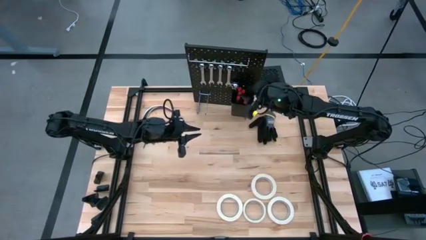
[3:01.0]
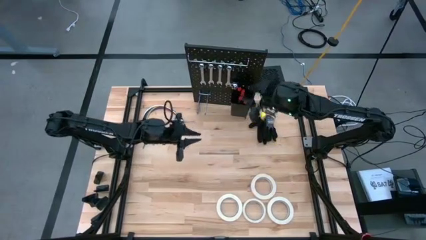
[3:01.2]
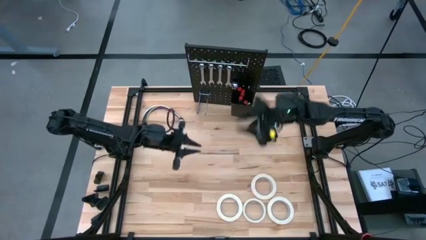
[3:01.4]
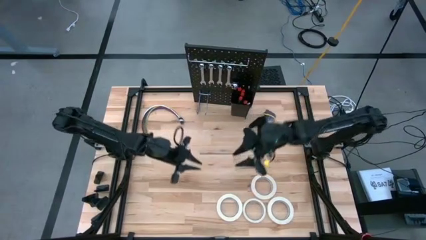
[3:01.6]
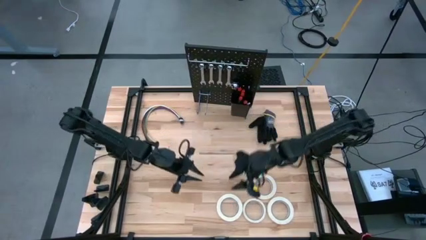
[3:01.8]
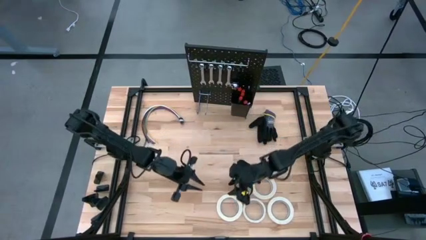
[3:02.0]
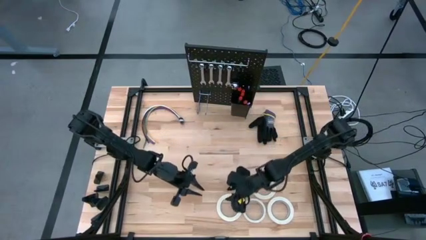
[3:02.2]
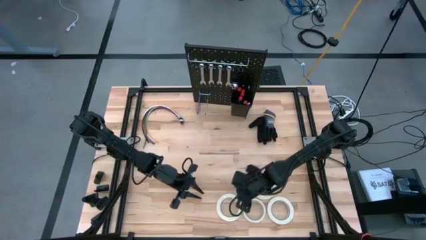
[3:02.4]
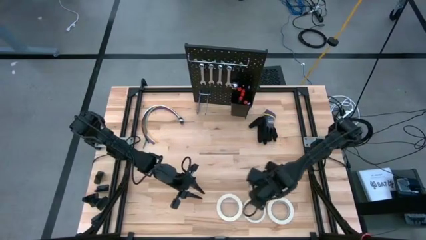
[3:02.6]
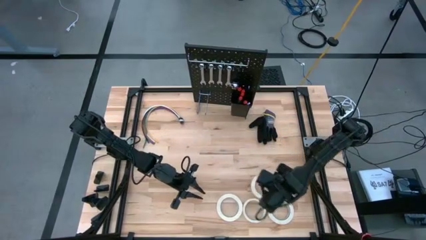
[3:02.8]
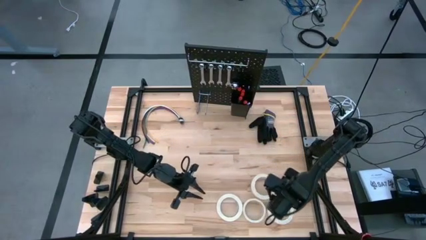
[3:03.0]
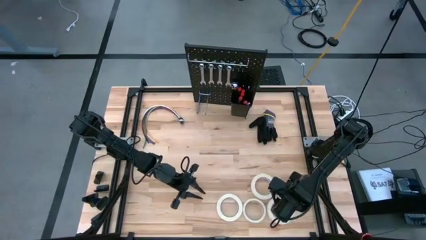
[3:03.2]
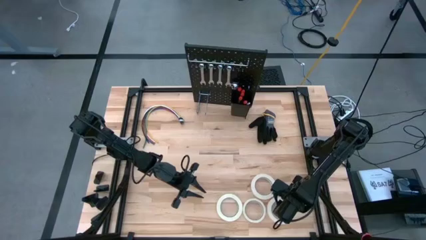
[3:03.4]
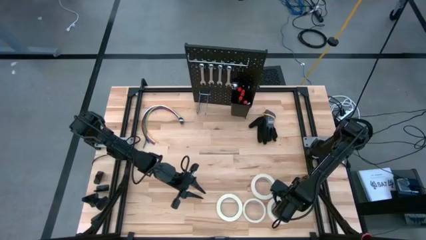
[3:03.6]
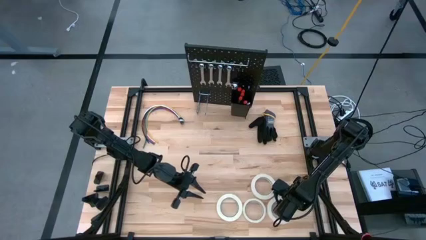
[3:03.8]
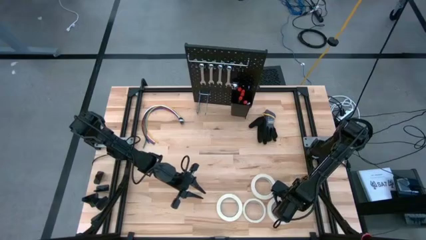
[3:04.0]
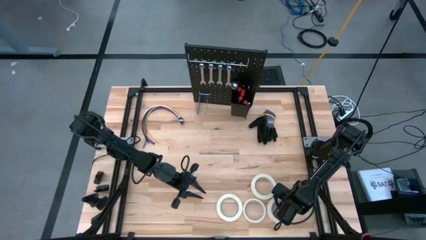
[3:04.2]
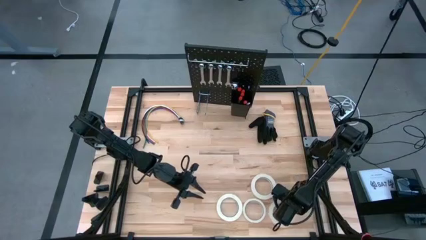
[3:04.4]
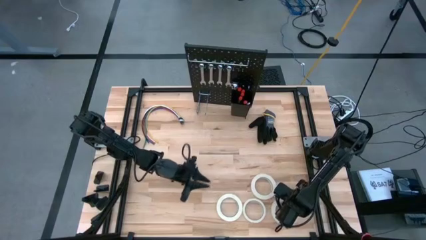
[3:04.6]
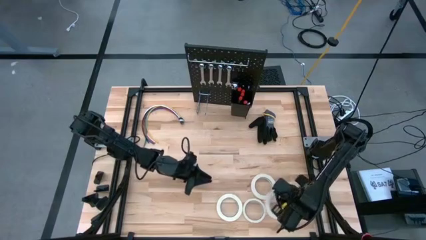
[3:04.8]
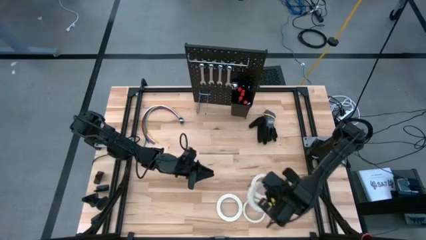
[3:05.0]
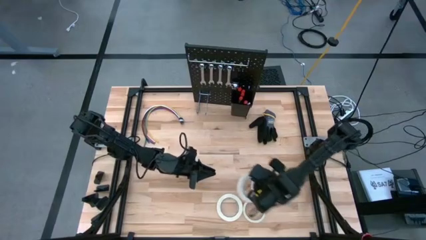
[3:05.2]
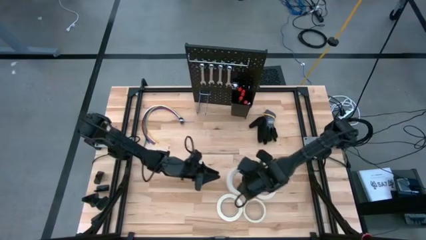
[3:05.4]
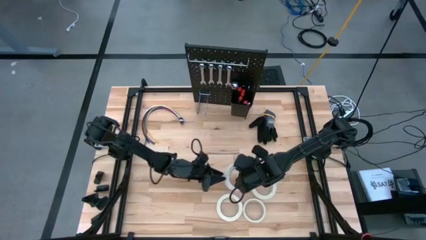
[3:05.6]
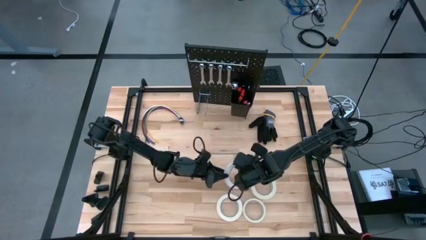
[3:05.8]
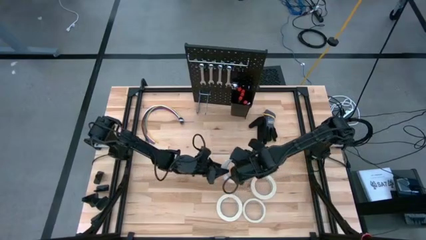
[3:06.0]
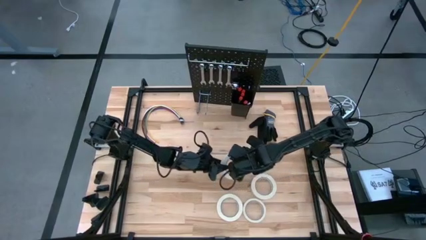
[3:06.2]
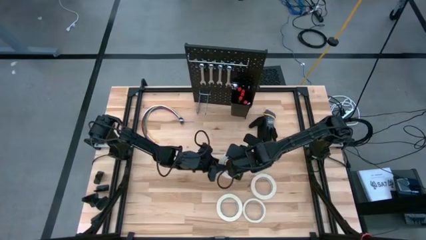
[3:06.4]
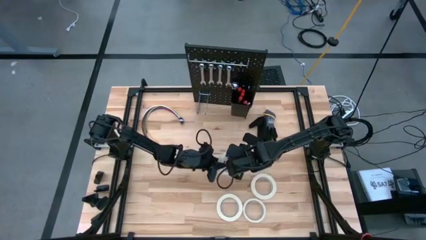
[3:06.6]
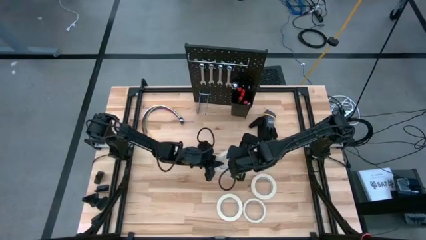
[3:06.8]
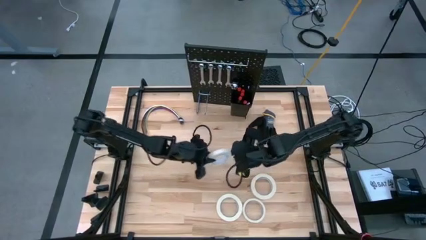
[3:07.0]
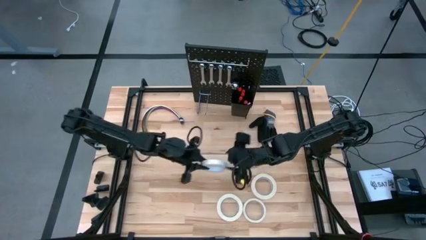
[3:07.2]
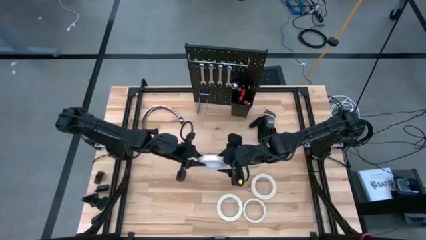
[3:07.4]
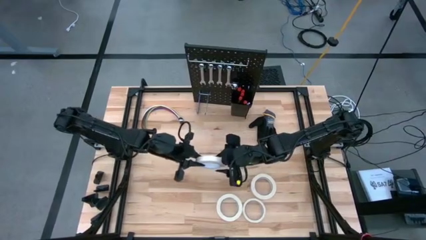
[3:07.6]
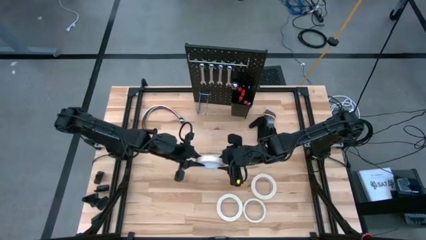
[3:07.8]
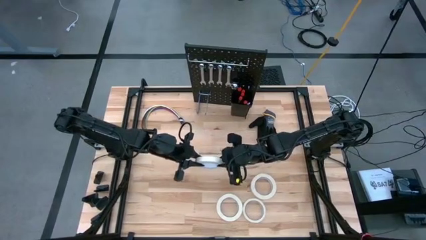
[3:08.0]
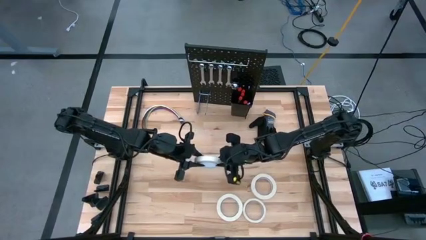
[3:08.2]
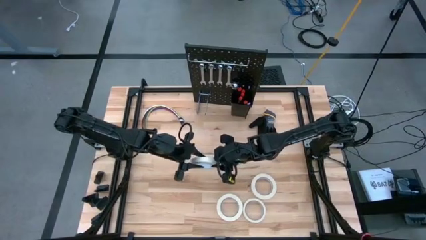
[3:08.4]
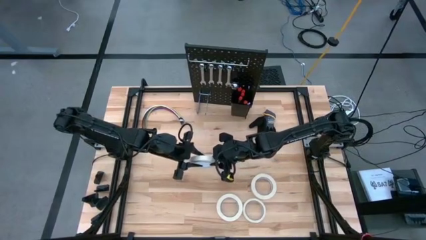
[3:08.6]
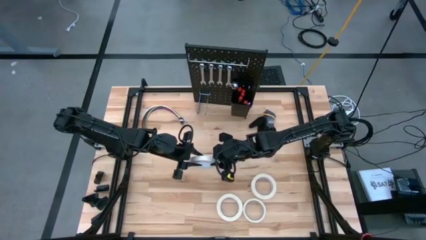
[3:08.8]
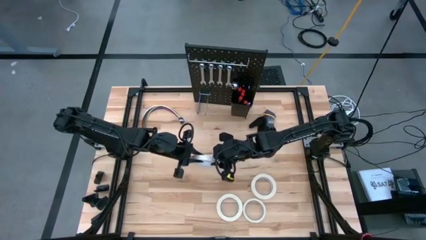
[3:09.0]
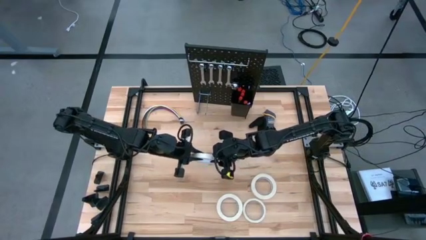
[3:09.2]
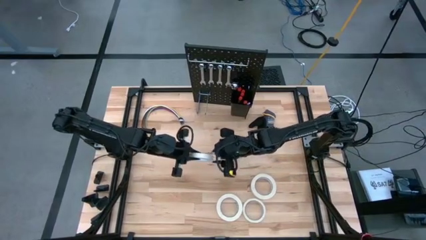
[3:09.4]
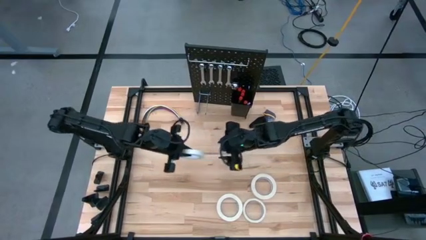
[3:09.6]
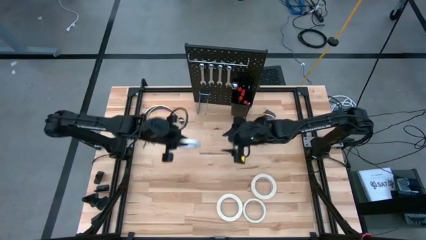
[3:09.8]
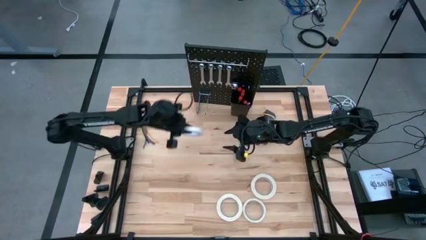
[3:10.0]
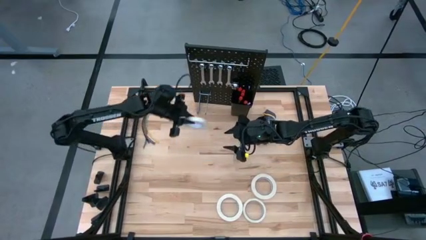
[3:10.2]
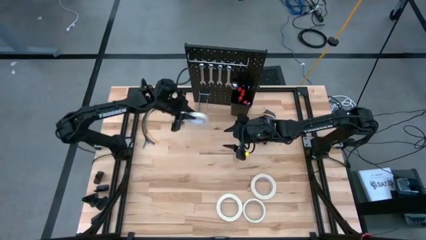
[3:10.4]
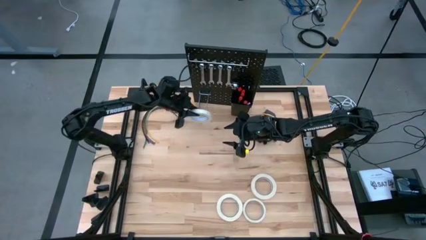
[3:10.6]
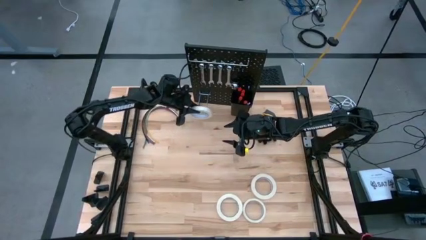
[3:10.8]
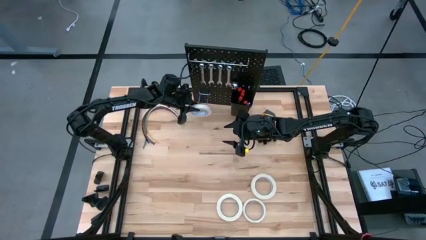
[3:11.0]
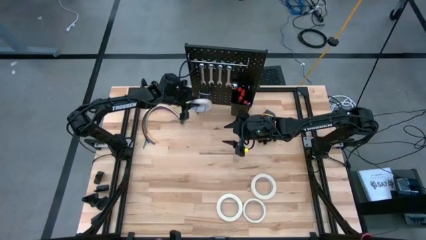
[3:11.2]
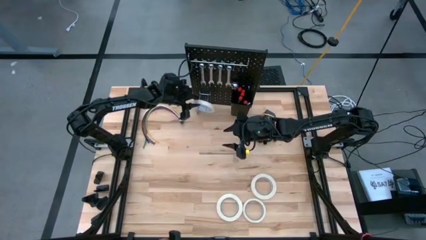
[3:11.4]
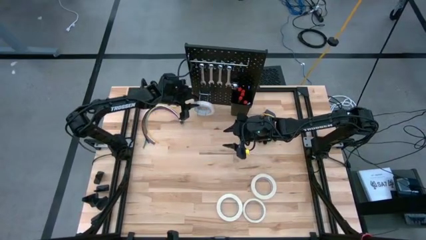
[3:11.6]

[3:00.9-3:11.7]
Task: Hang tools onto peg board
Hang the white tape on the peg board

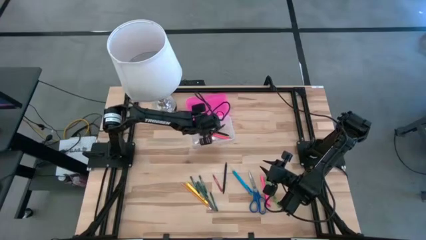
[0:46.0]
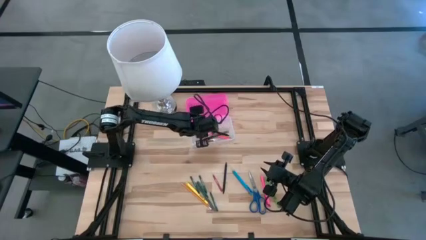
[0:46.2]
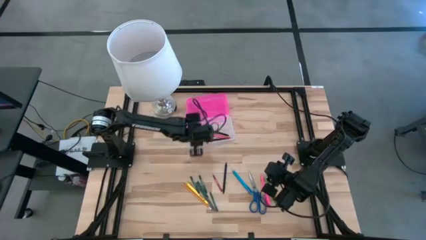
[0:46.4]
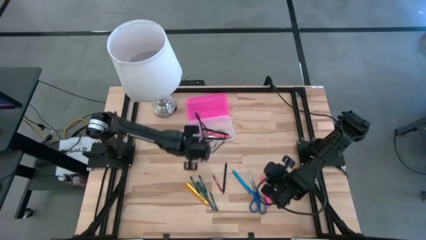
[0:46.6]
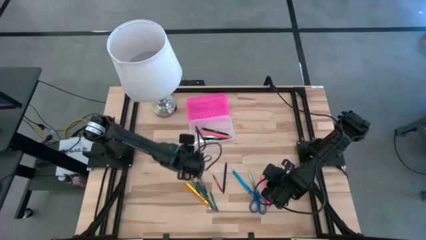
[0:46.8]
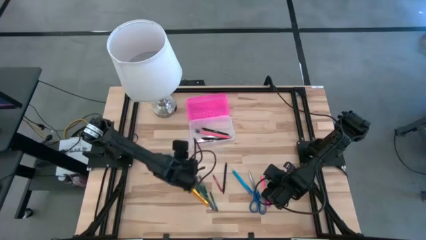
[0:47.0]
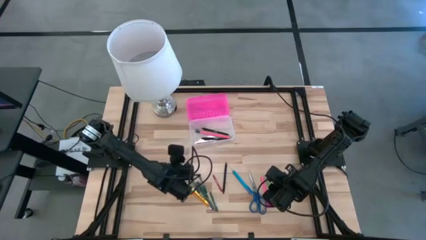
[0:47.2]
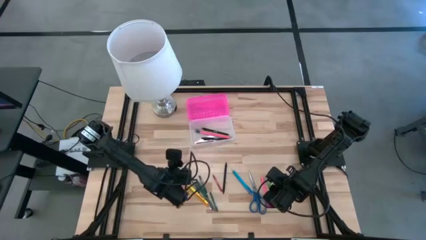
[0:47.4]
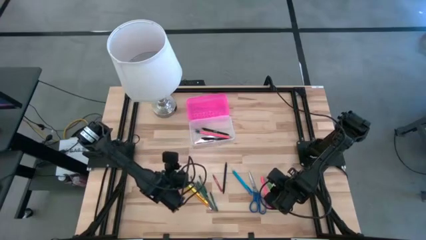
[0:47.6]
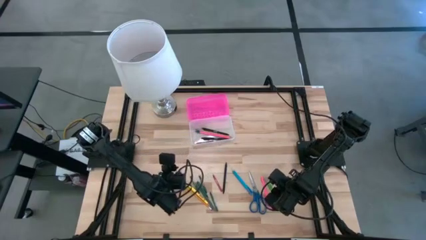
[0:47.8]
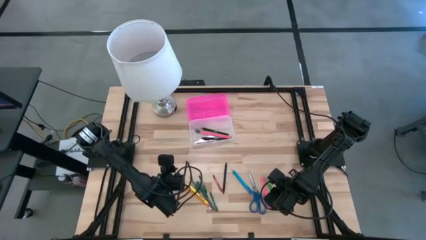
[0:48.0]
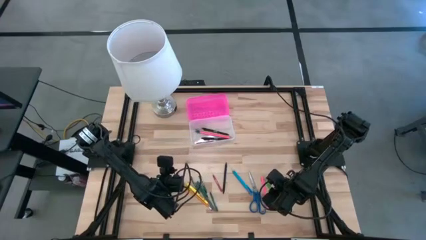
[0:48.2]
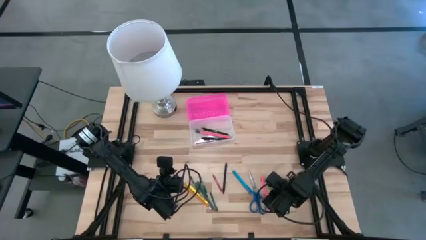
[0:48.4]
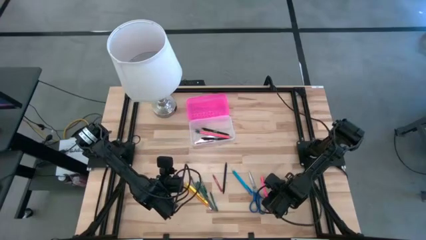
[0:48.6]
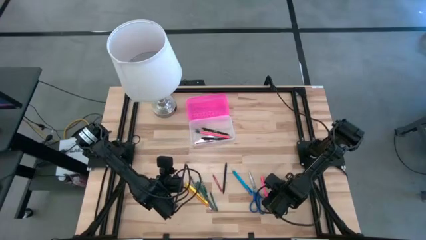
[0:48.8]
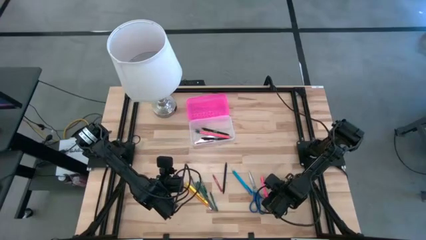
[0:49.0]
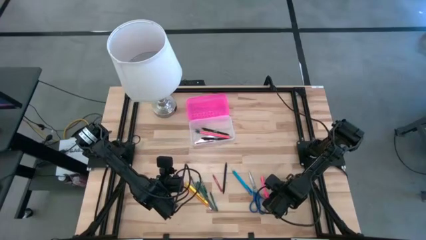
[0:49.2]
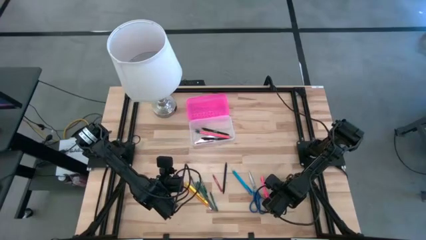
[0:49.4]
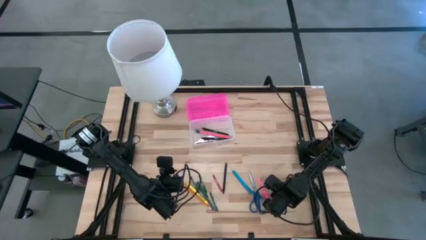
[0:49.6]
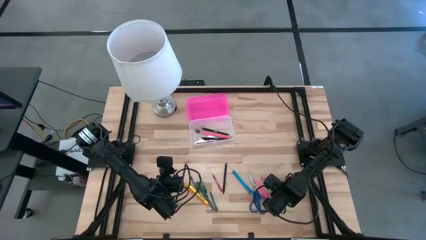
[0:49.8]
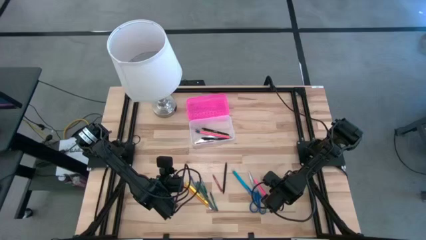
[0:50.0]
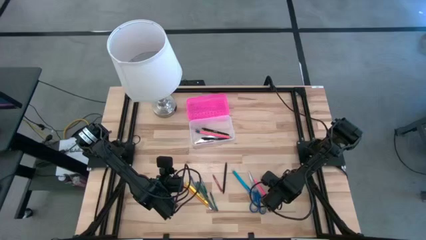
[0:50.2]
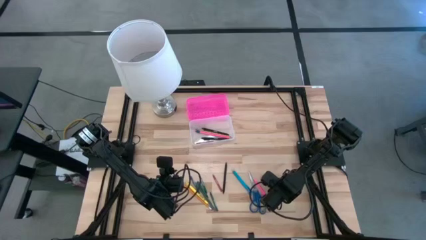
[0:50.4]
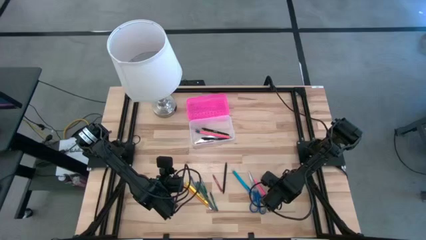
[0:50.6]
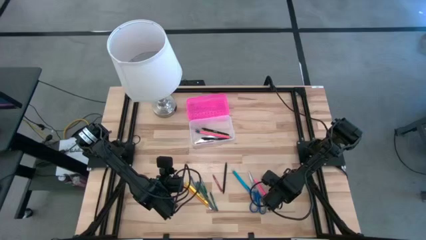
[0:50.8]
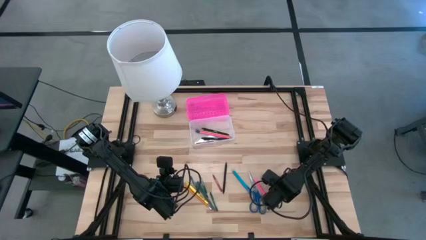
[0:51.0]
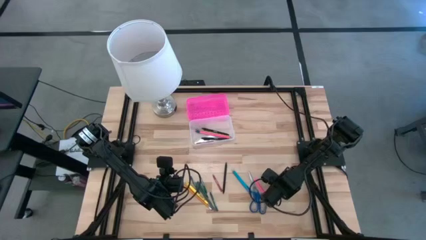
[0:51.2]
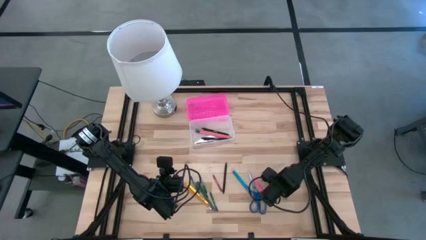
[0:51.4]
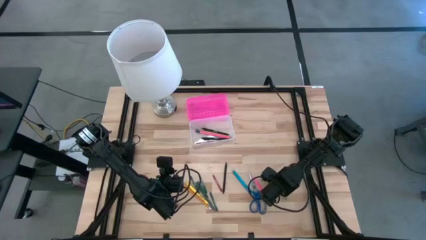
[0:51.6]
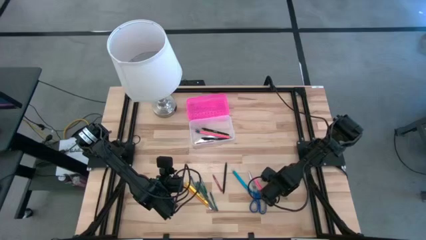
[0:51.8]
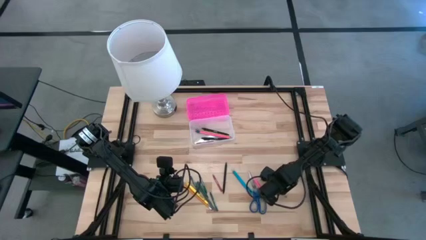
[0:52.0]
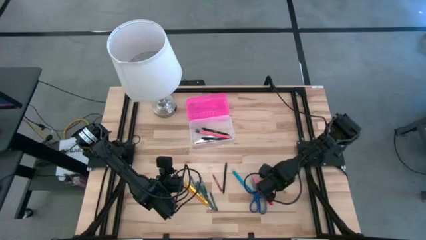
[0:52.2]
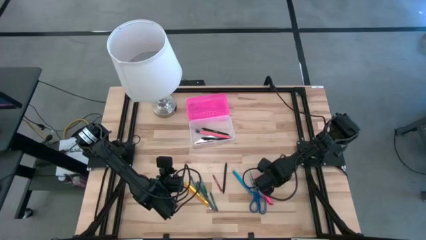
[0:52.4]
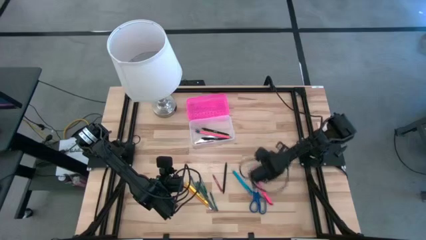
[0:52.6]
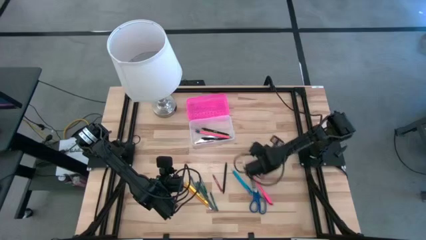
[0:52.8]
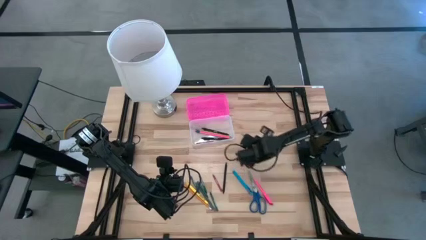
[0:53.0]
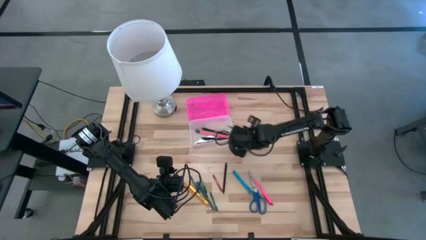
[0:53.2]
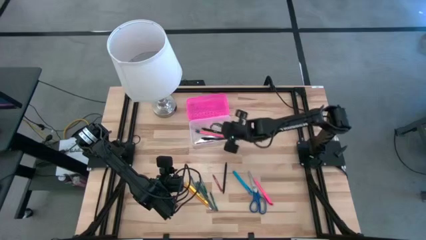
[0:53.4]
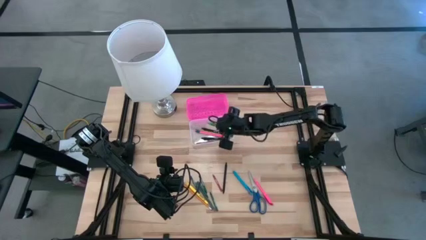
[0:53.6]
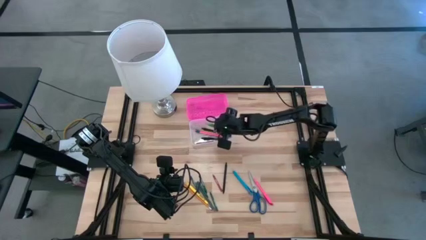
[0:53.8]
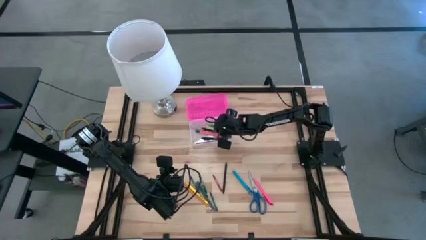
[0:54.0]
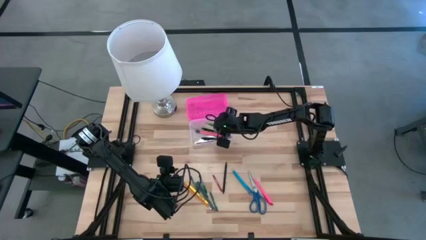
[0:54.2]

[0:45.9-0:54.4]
Task: Pick & place school supplies into a supply box
Put the green pen into the pink supply box
